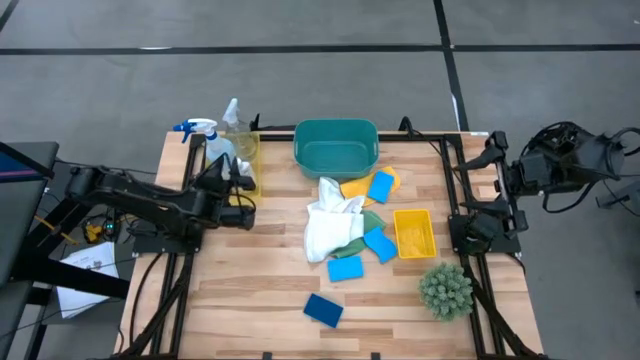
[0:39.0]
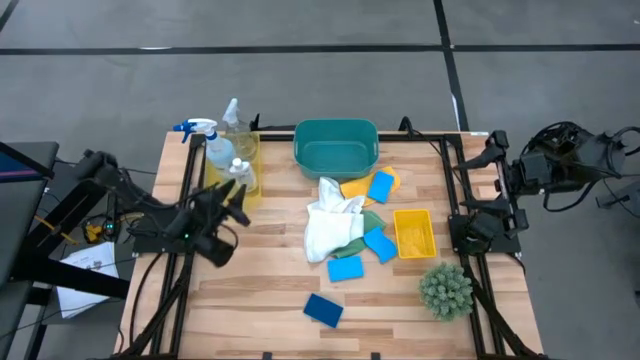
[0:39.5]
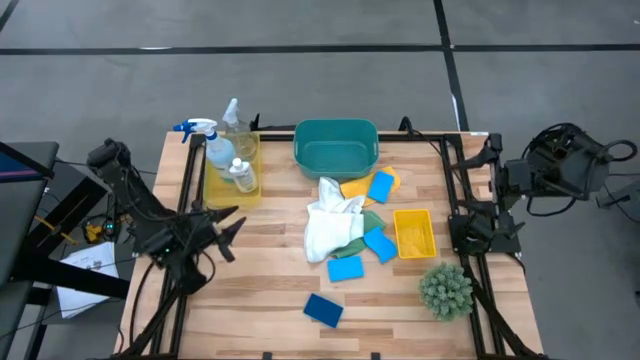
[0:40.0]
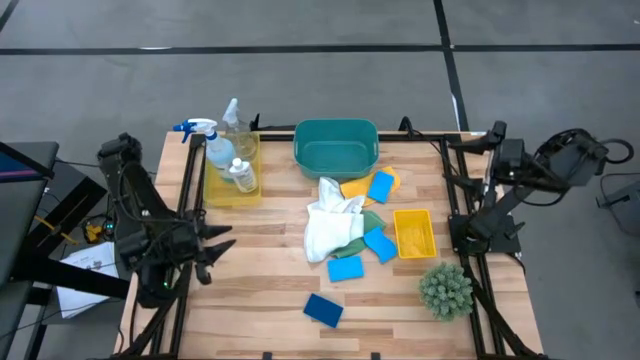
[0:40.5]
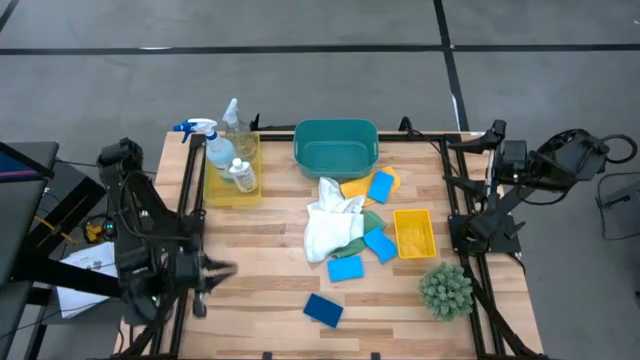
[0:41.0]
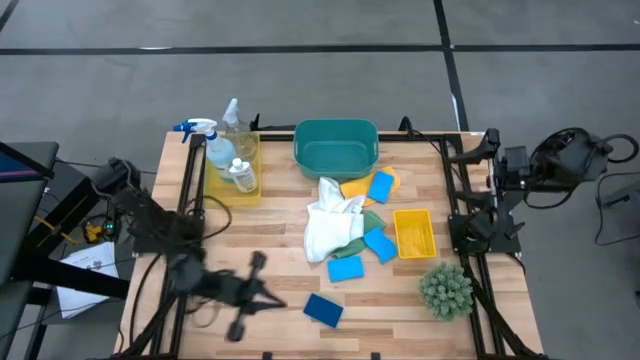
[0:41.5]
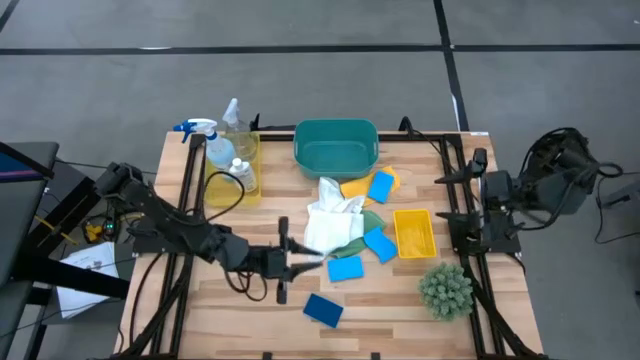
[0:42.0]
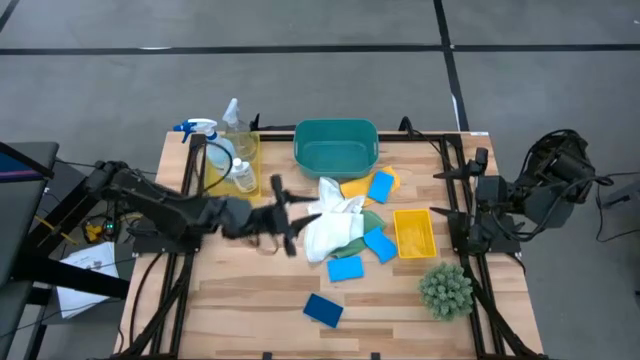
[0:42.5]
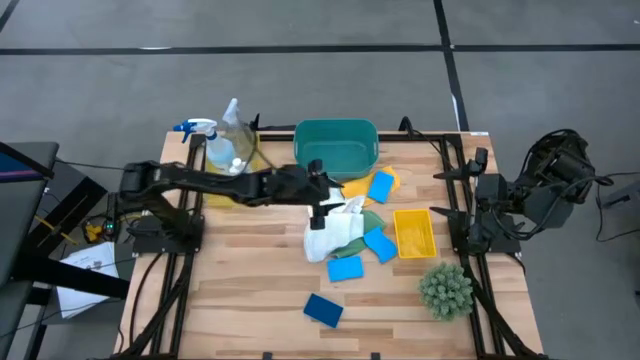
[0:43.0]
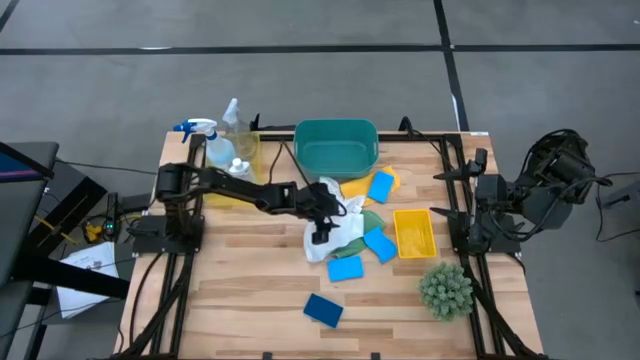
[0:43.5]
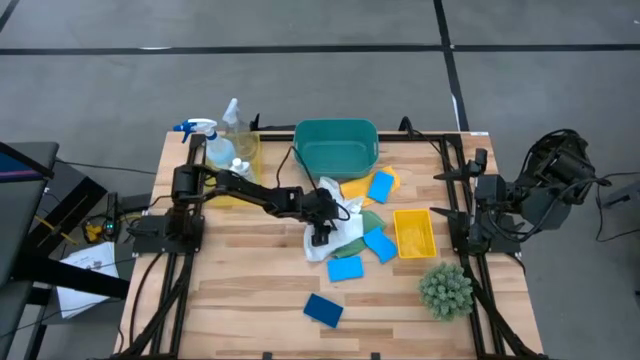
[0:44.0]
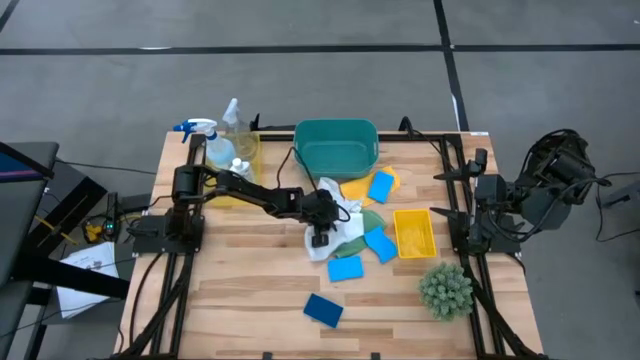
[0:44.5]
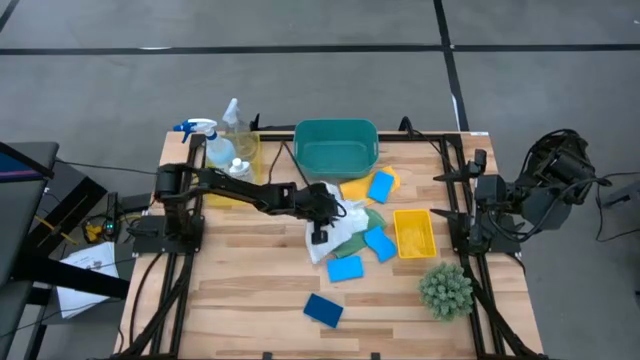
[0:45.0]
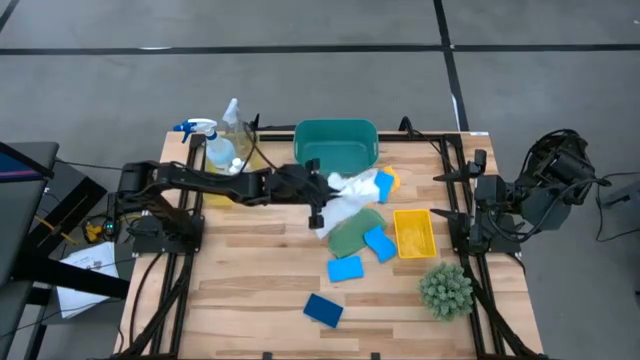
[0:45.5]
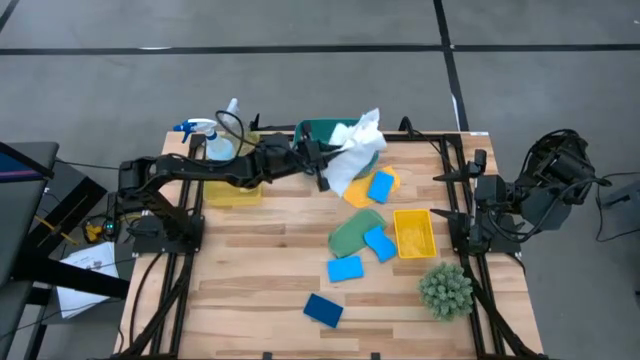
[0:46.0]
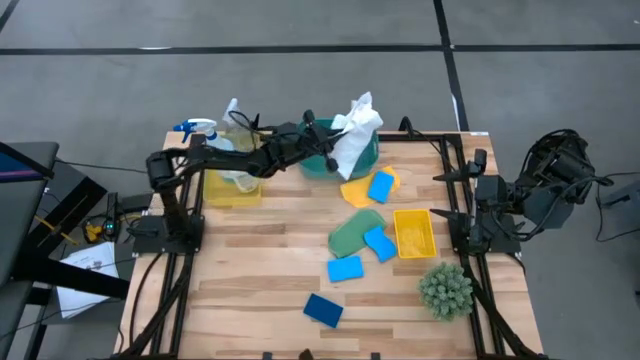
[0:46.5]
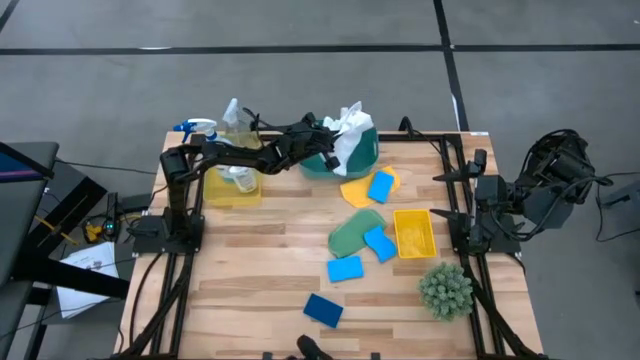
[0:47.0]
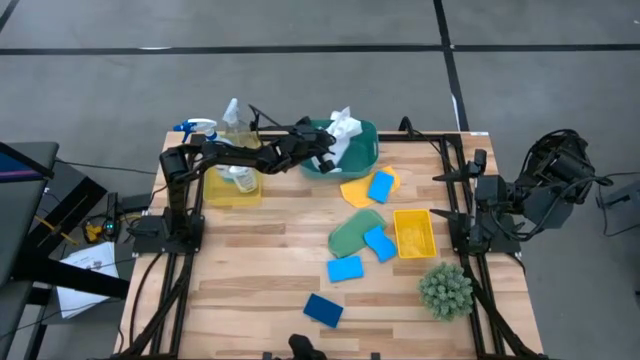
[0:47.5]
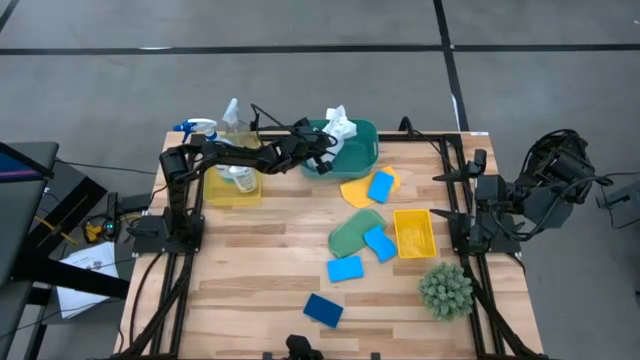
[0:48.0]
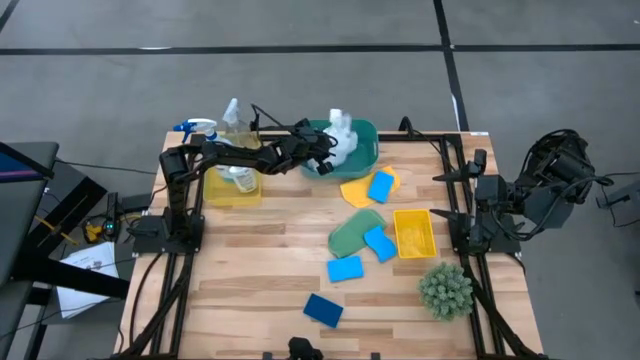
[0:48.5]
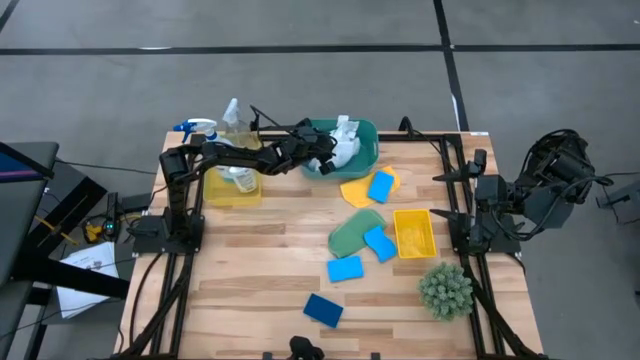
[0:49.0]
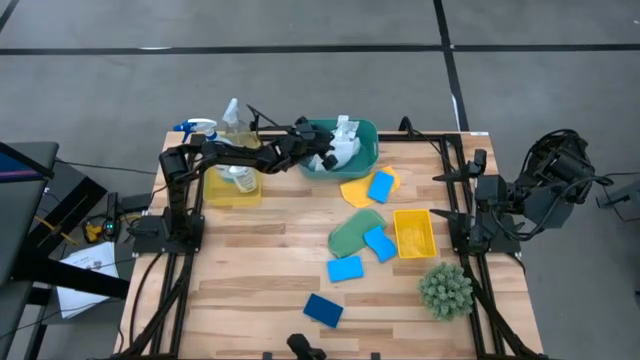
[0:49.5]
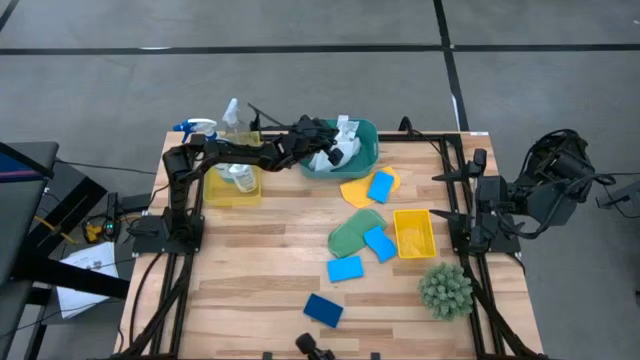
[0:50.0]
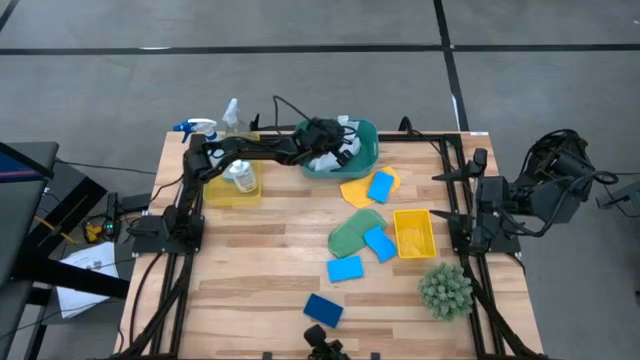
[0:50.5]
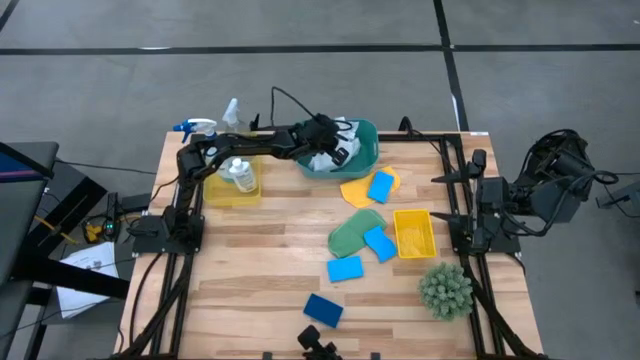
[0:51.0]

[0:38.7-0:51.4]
Task: Pick & Place Kitchen Items
Put the white cleaning cloth into the green bin

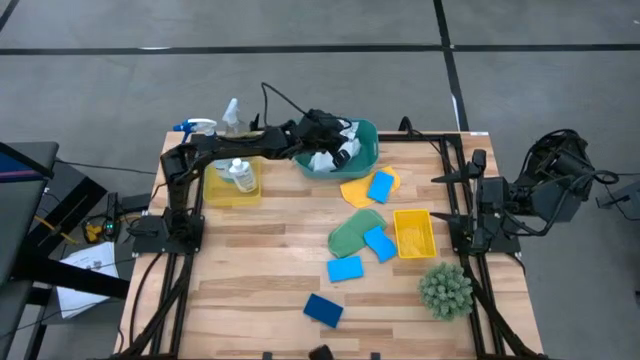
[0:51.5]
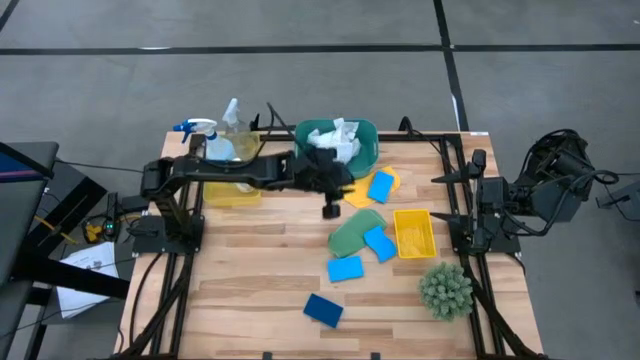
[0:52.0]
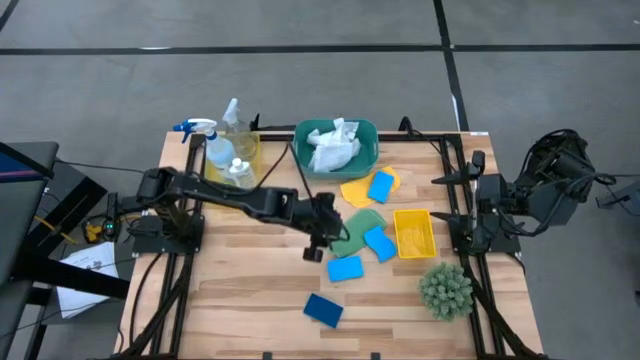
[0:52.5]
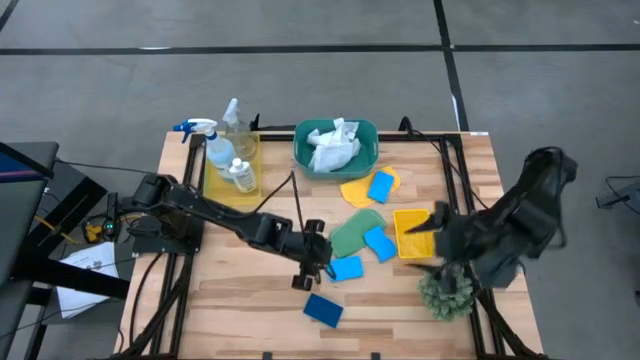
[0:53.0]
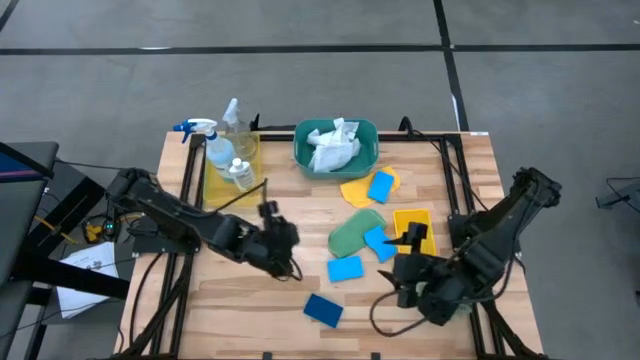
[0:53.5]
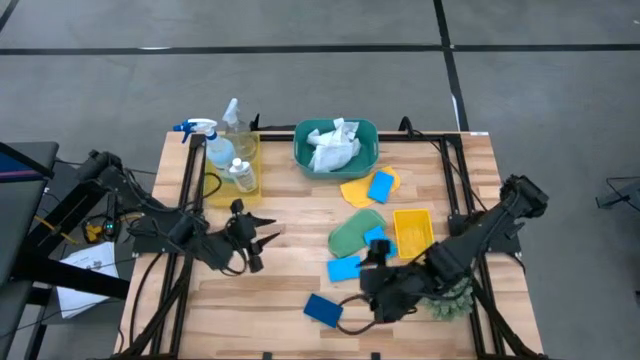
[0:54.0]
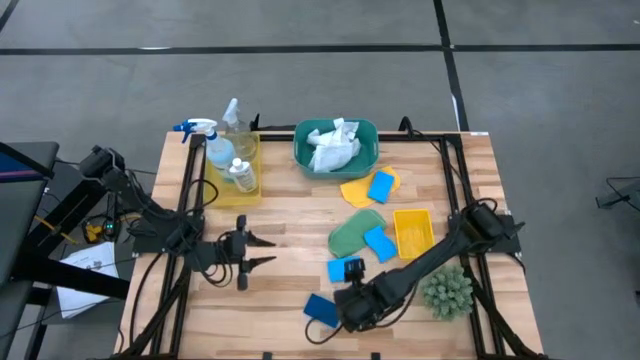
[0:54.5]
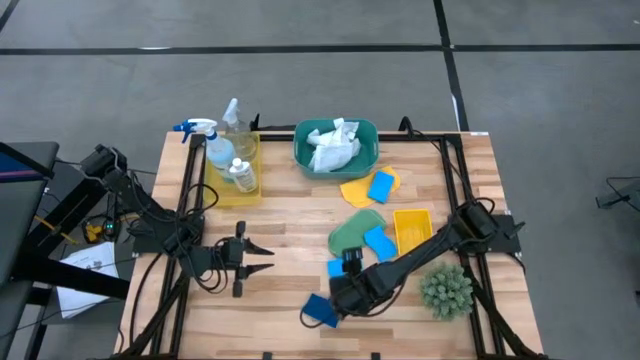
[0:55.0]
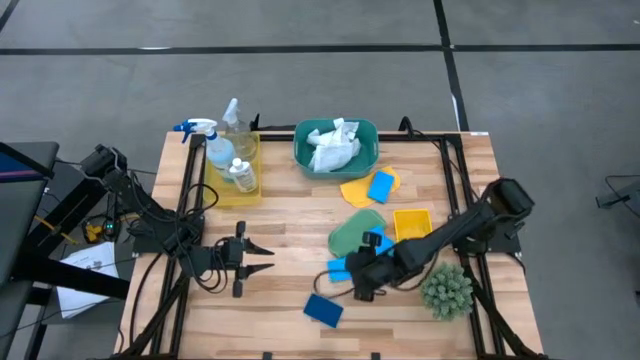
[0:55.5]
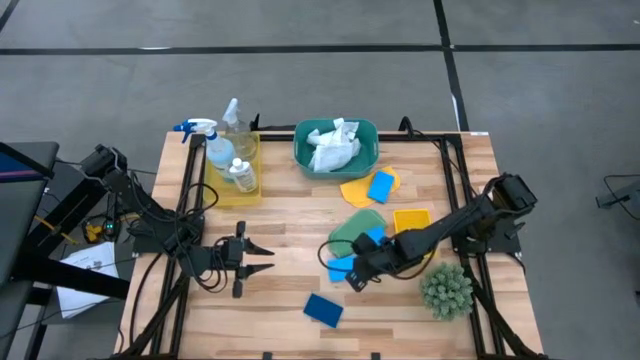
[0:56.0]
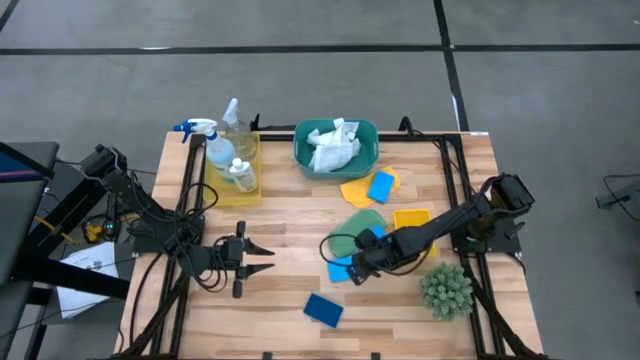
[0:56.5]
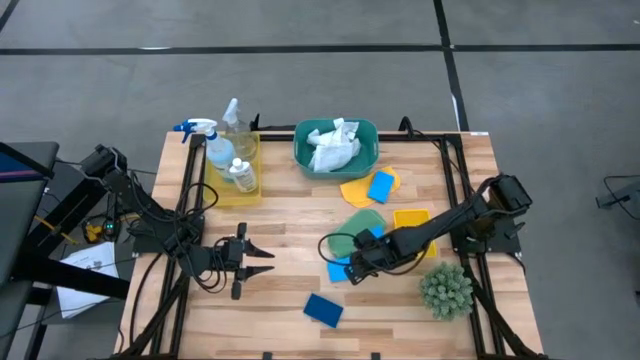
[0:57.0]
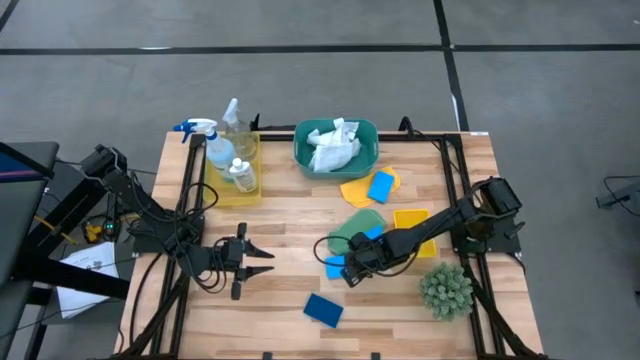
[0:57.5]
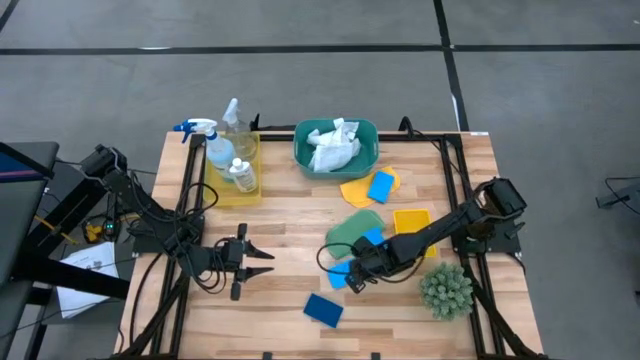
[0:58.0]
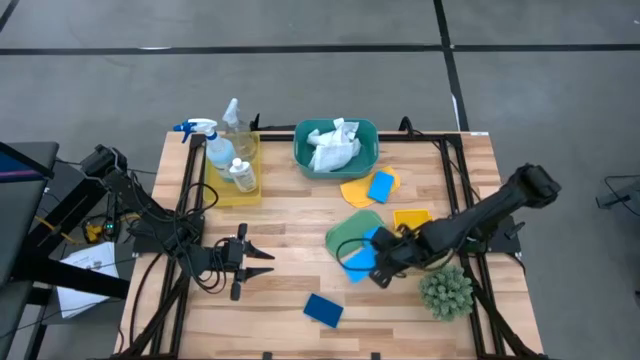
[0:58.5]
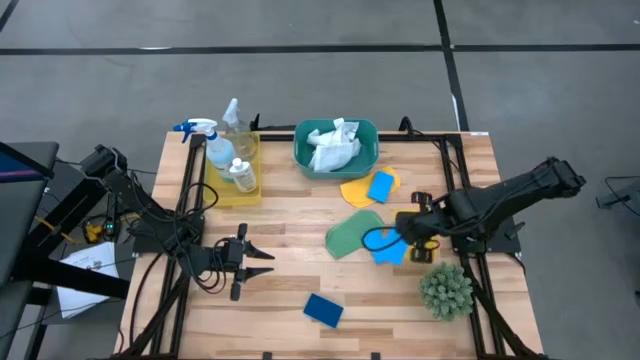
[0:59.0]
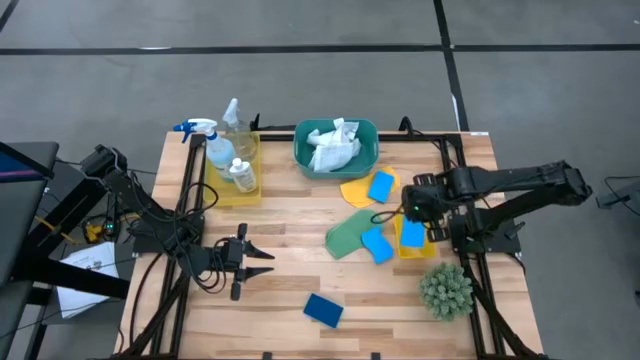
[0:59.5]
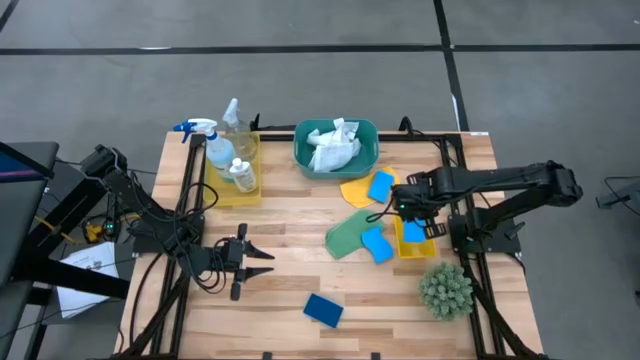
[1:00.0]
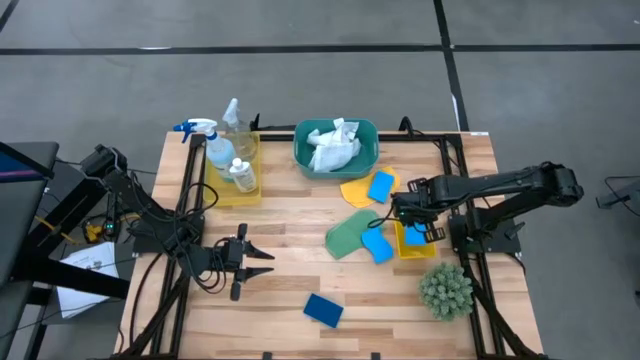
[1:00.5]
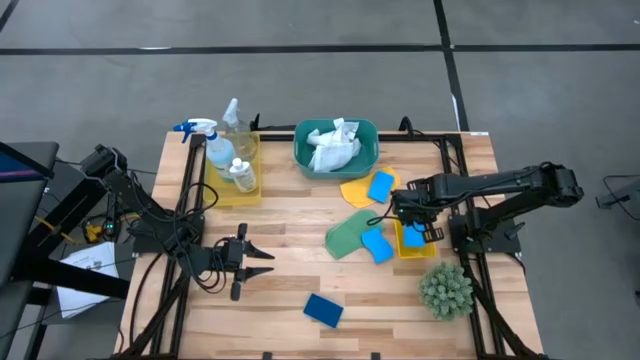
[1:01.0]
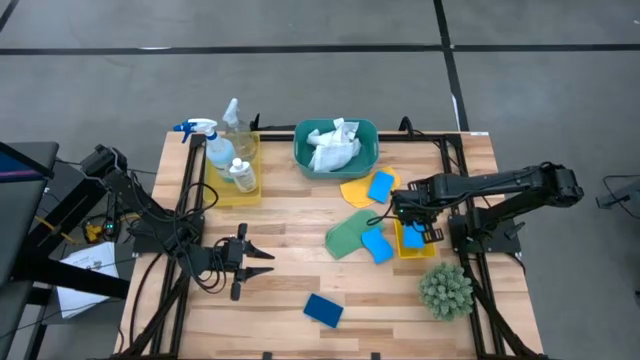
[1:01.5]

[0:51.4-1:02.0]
Put the blue sponge into the right yellow bin
